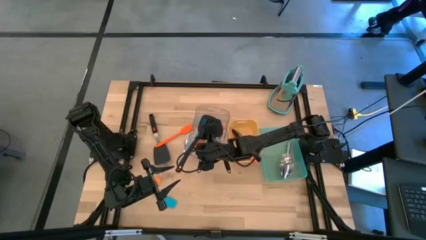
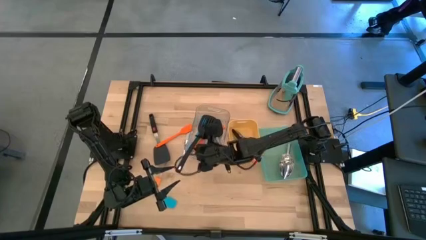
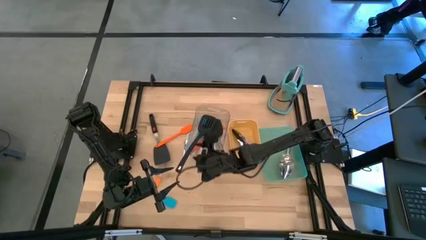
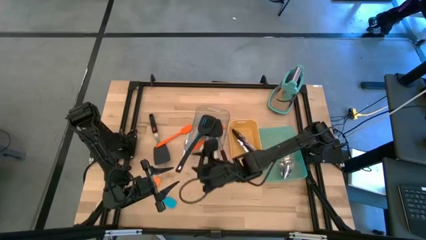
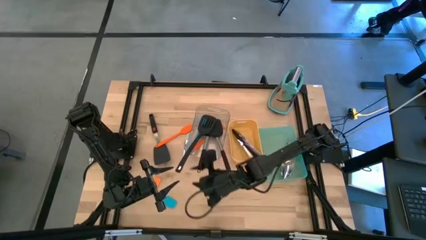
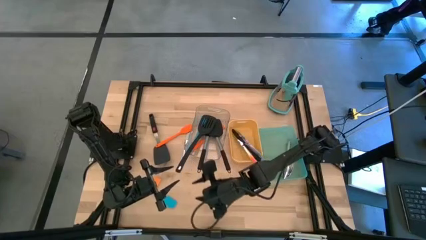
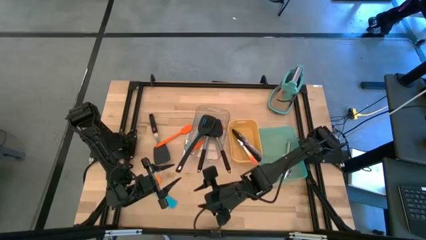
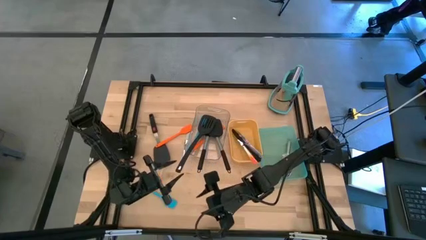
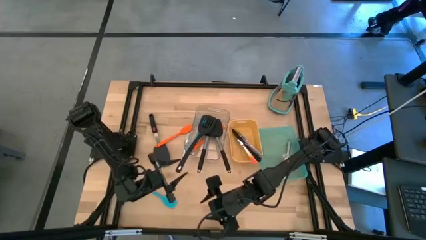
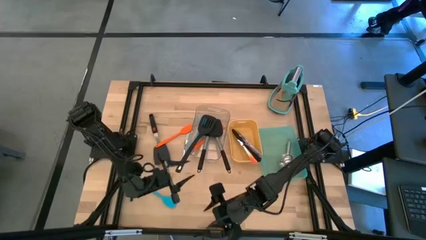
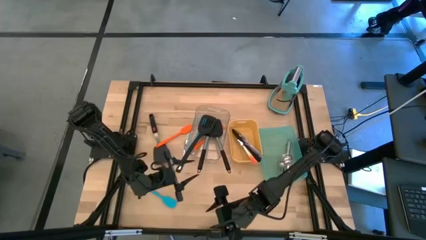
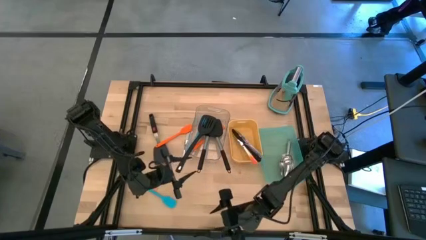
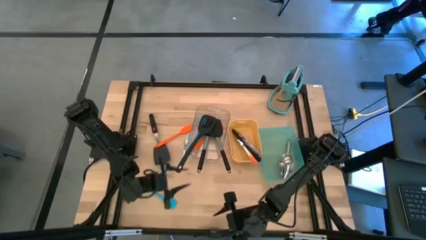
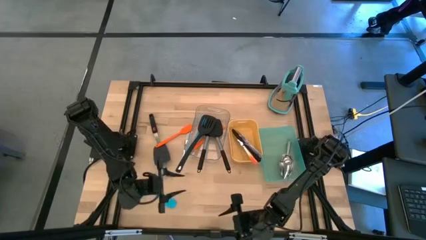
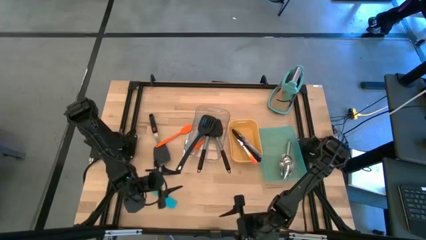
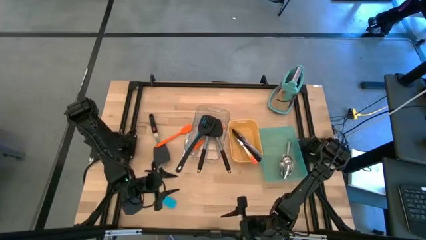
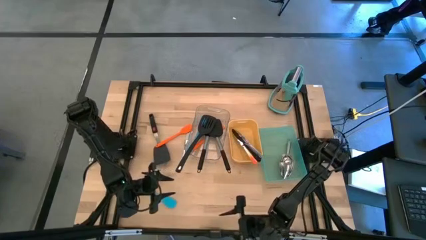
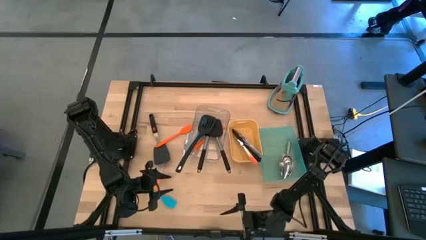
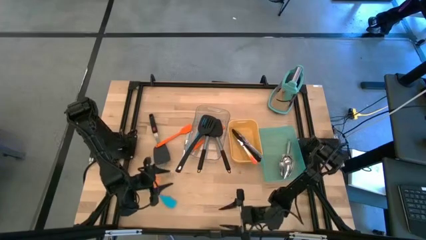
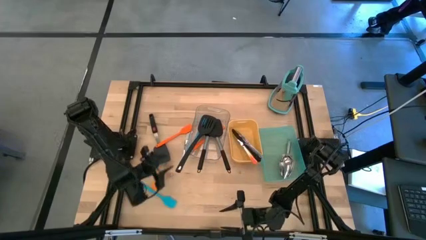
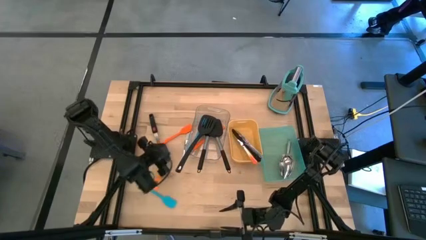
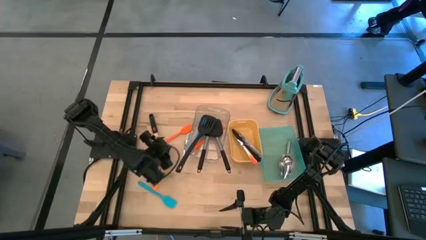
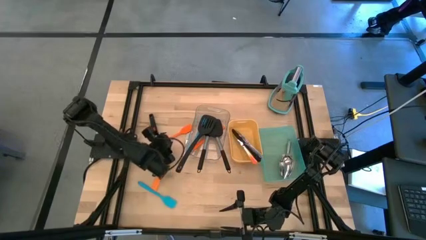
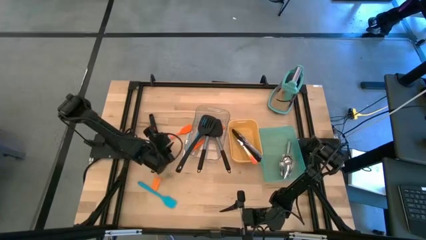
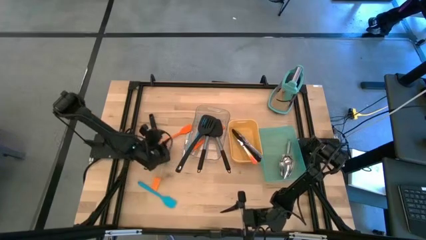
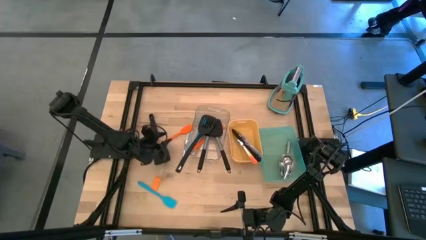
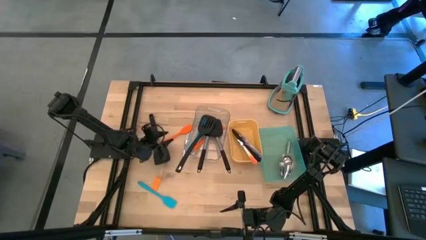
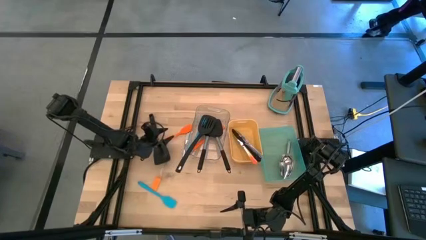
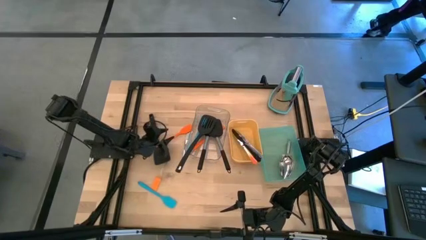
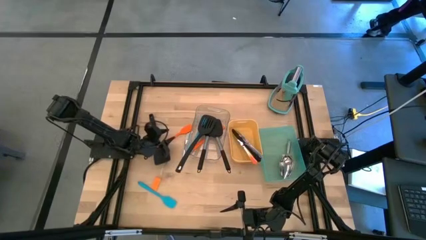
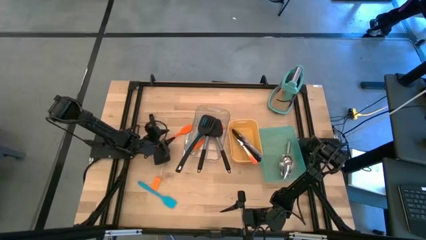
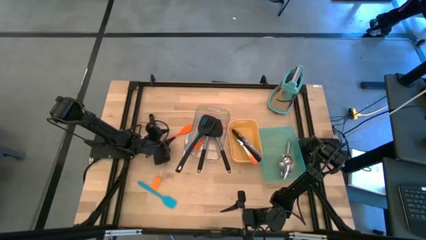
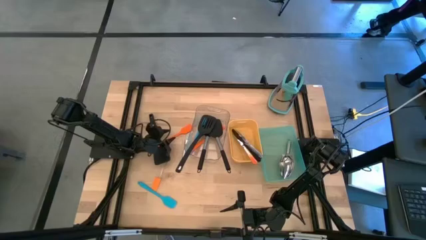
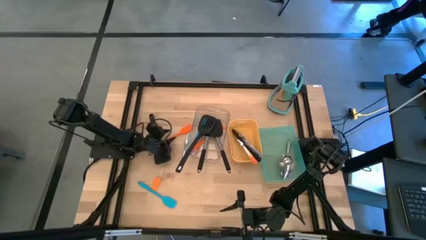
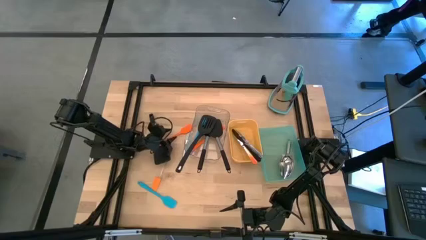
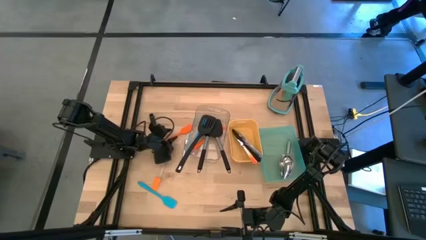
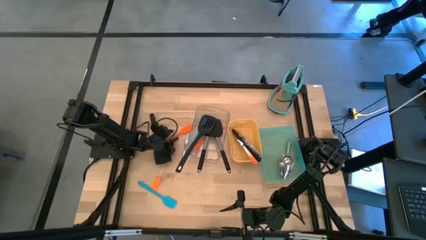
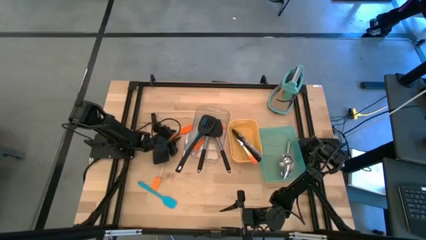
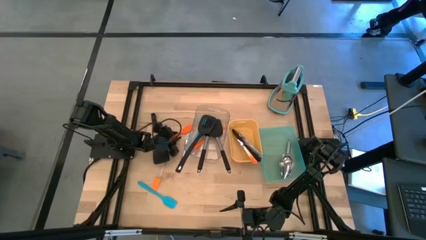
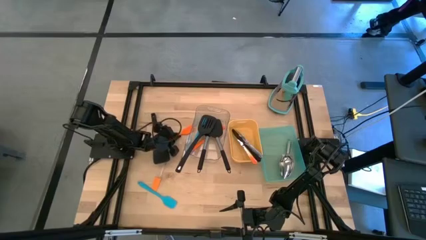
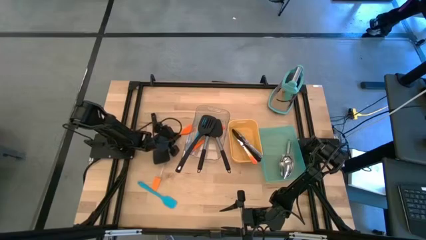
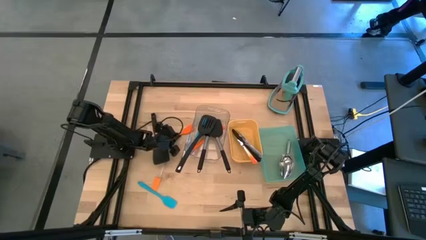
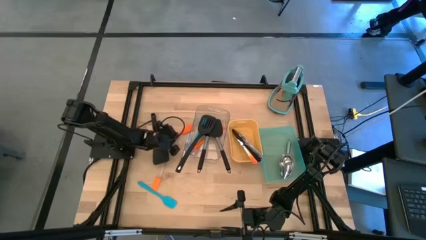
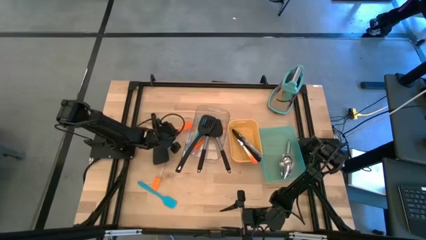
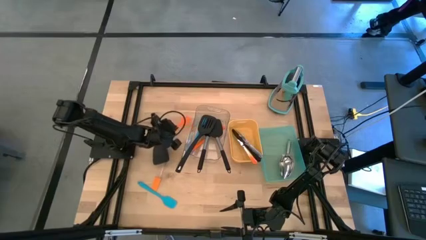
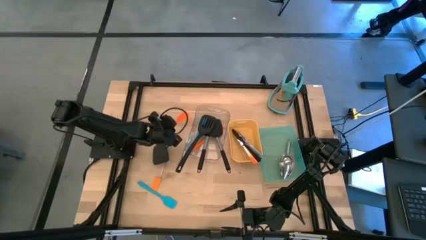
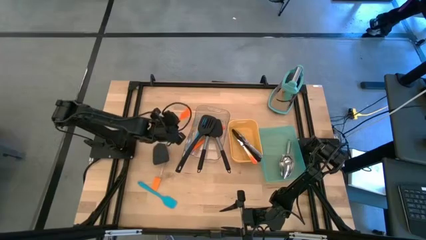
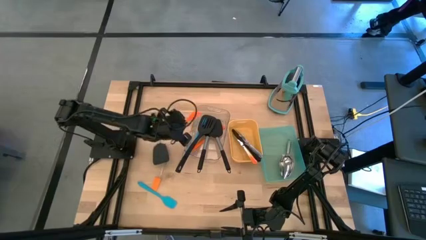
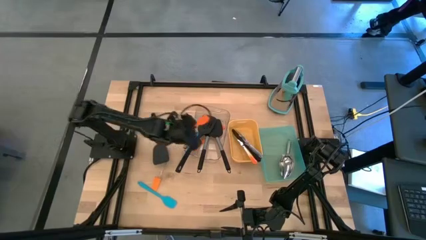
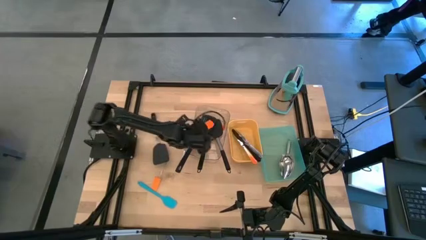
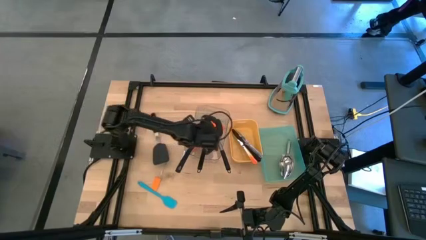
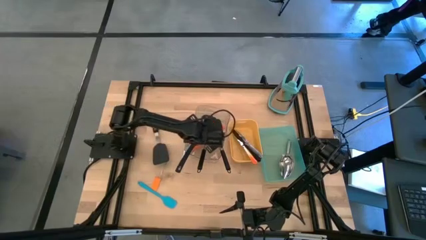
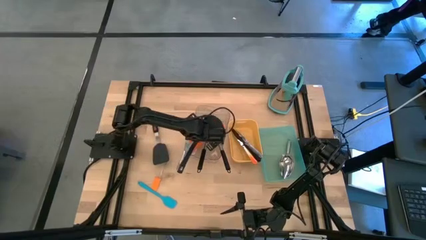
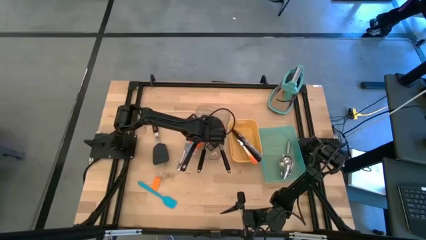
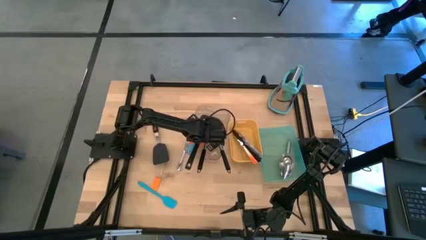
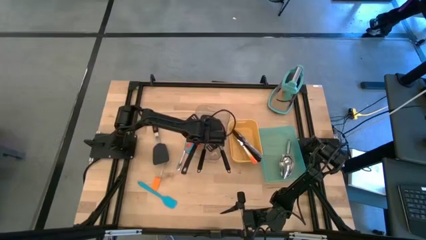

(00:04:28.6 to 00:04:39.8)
Task: Pick & Place Kitchen Items
Put the orange spatula into the transparent bin
